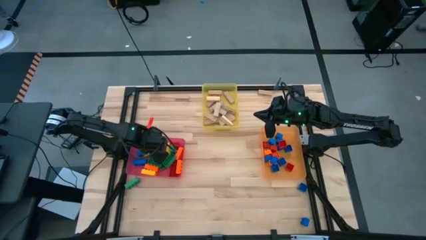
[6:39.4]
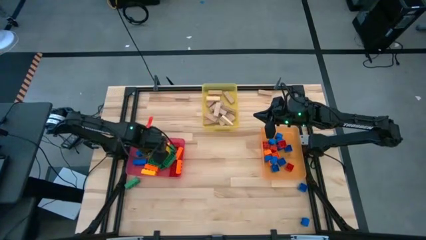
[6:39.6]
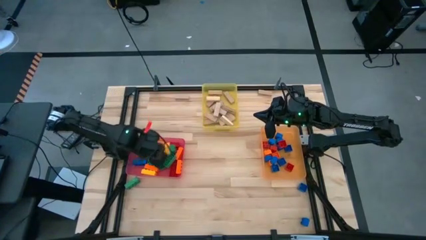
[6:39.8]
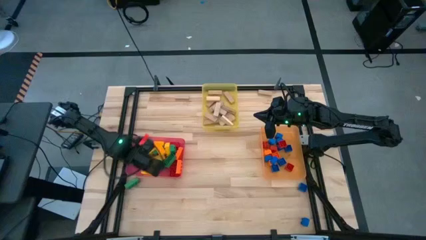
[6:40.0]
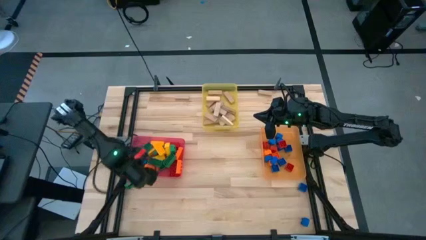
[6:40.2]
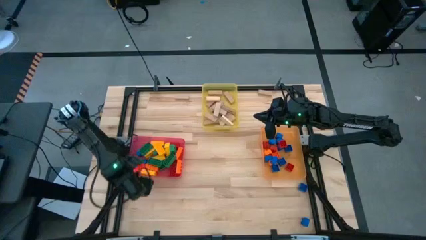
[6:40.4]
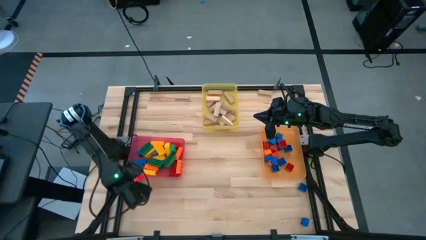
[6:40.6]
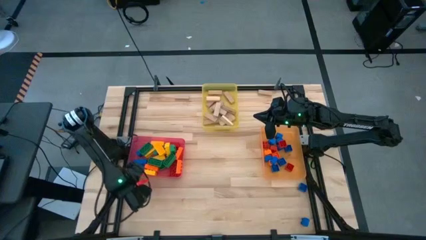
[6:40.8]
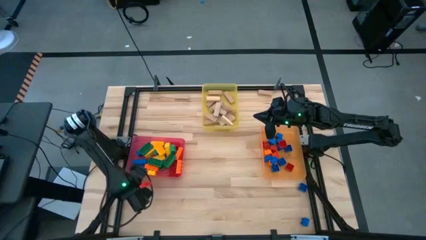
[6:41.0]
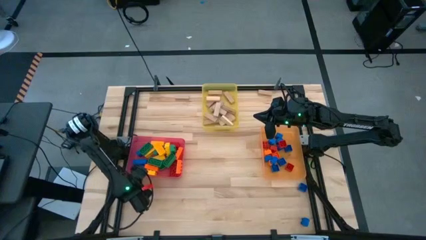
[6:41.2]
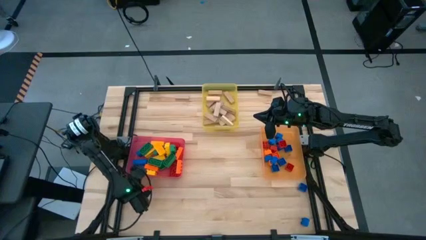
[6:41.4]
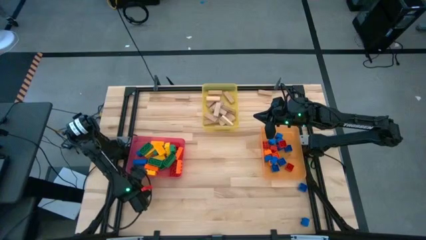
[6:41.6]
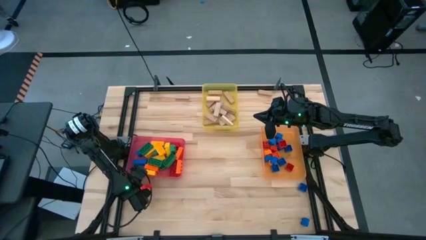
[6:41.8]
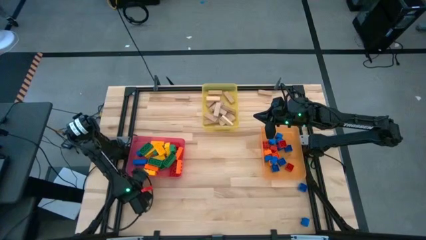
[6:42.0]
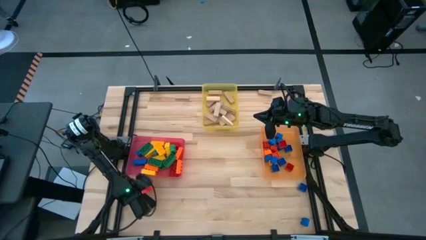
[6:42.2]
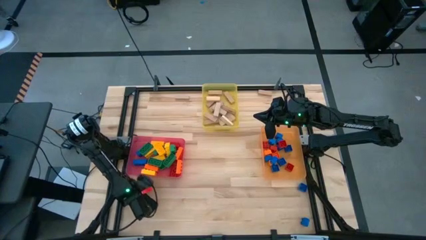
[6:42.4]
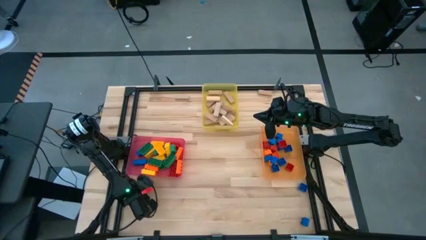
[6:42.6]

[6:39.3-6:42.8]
Task: Sort blocks by size
Put the 3 stud green game piece into the pink bin

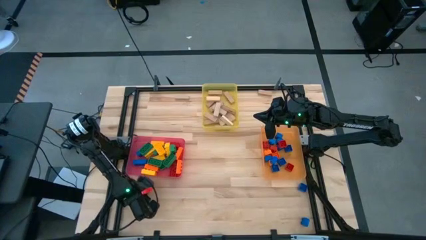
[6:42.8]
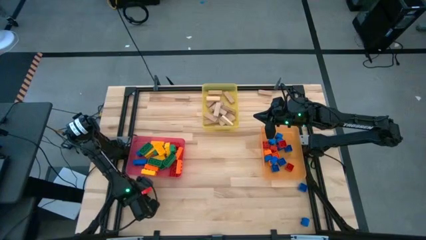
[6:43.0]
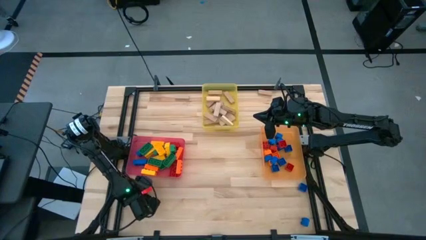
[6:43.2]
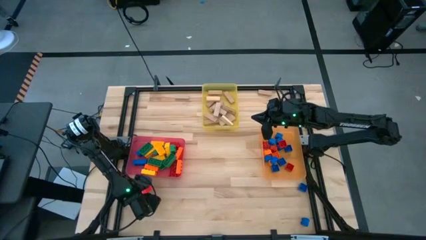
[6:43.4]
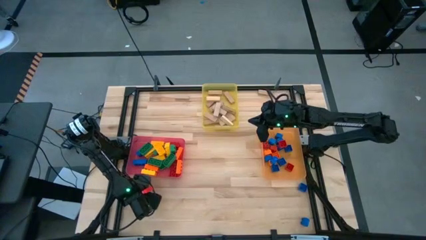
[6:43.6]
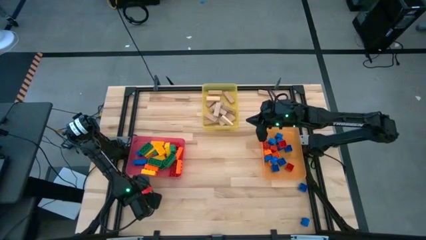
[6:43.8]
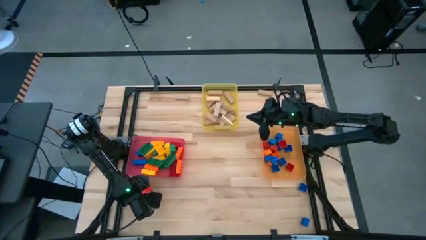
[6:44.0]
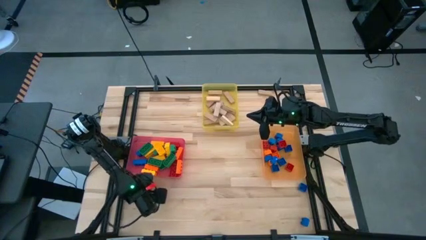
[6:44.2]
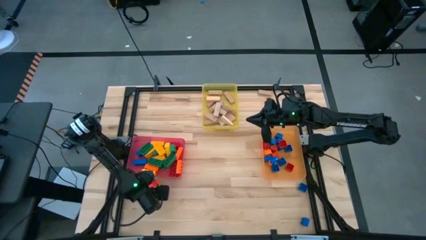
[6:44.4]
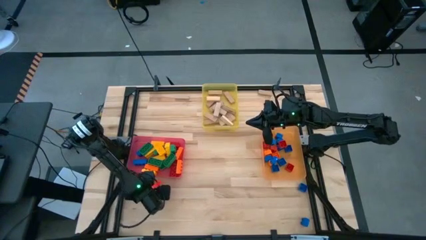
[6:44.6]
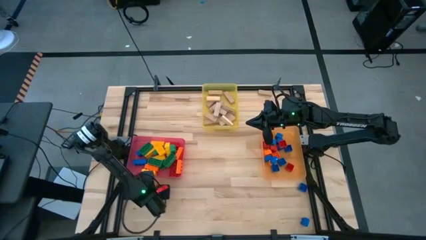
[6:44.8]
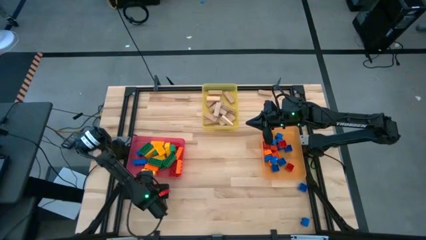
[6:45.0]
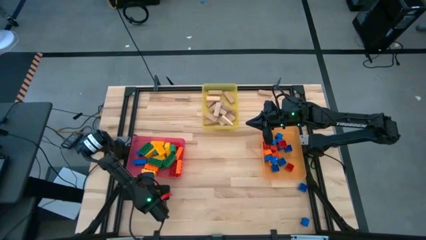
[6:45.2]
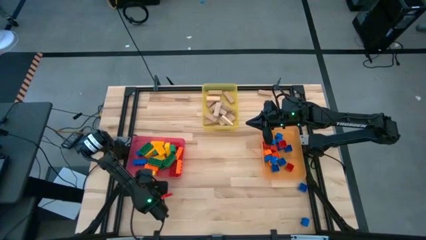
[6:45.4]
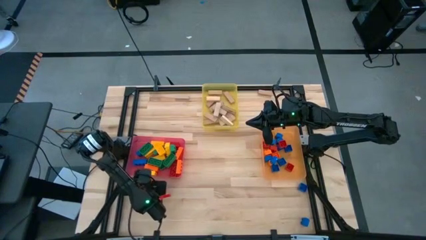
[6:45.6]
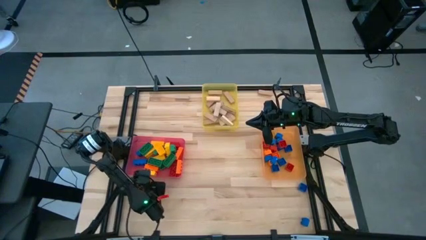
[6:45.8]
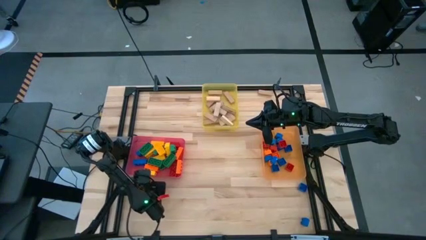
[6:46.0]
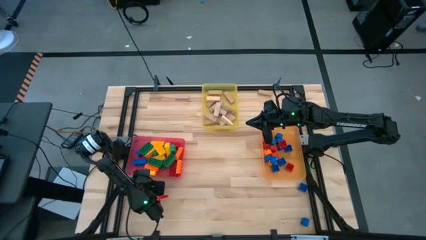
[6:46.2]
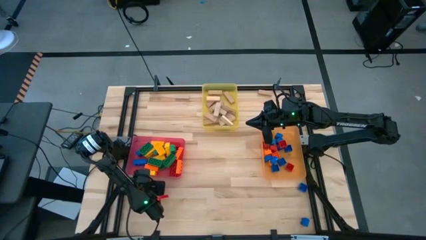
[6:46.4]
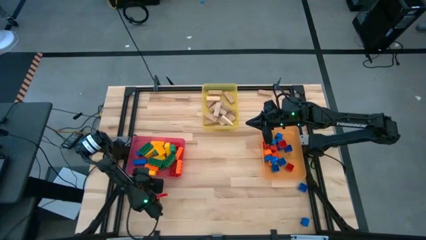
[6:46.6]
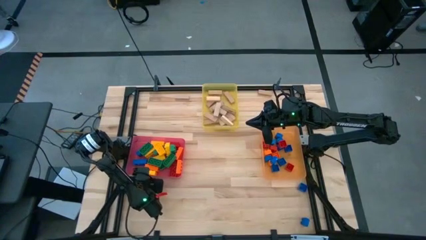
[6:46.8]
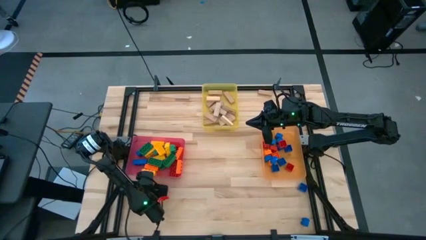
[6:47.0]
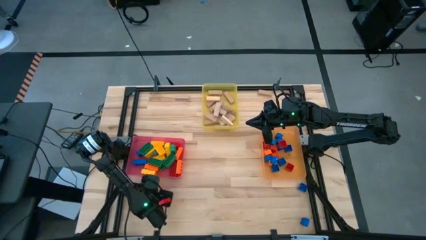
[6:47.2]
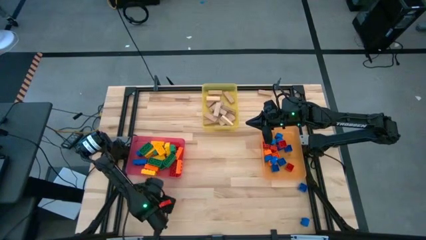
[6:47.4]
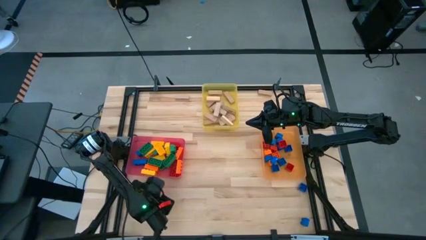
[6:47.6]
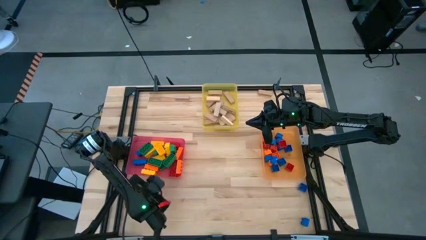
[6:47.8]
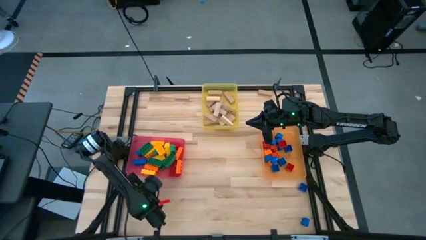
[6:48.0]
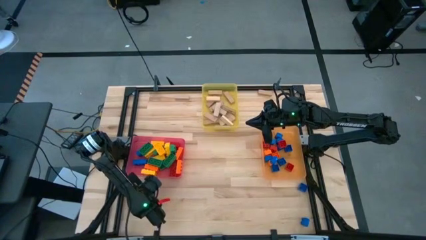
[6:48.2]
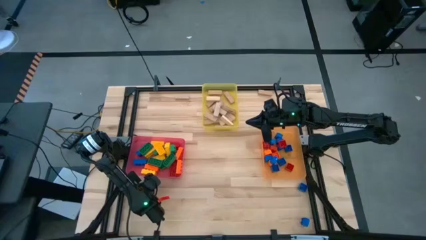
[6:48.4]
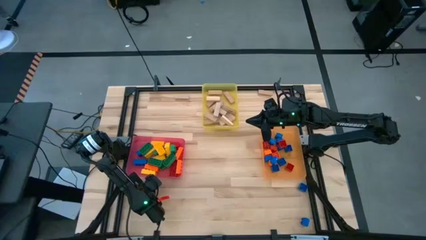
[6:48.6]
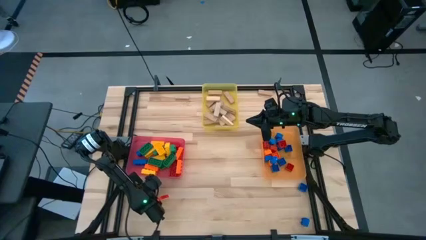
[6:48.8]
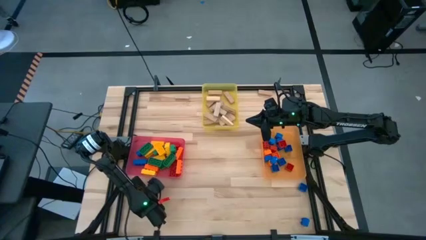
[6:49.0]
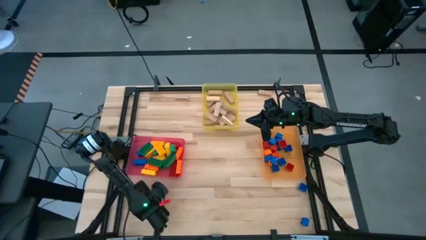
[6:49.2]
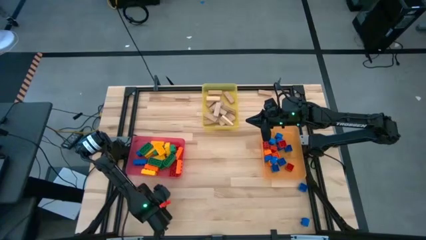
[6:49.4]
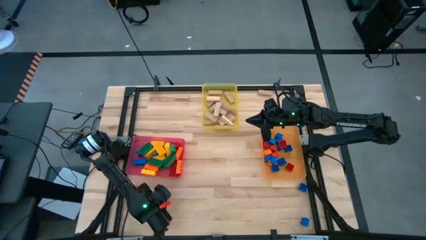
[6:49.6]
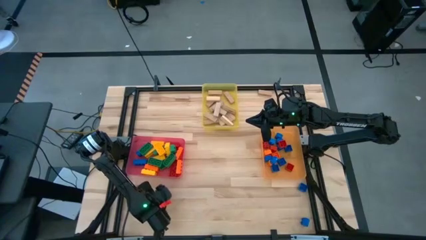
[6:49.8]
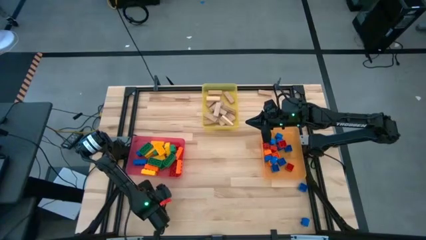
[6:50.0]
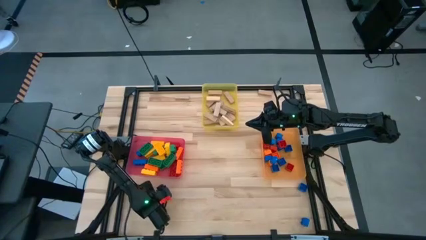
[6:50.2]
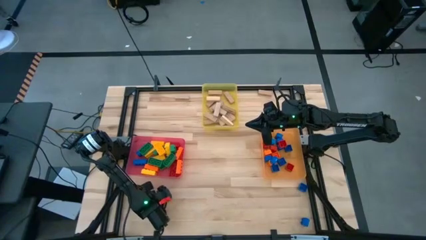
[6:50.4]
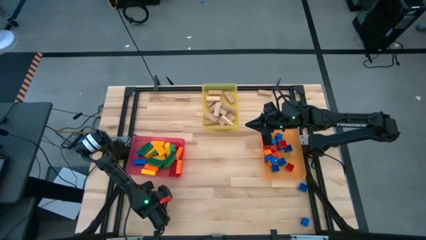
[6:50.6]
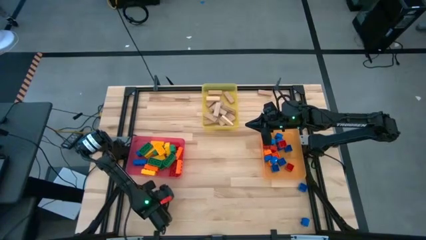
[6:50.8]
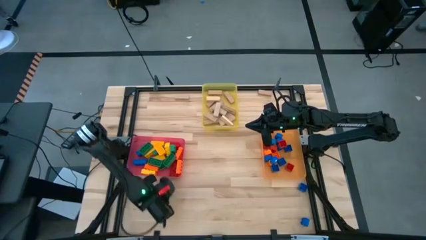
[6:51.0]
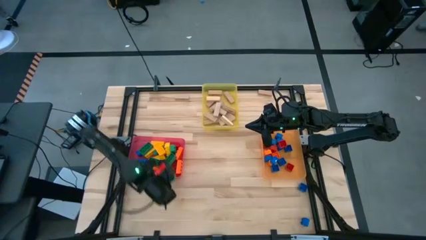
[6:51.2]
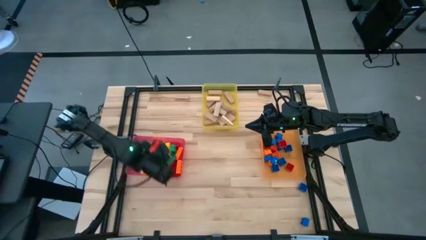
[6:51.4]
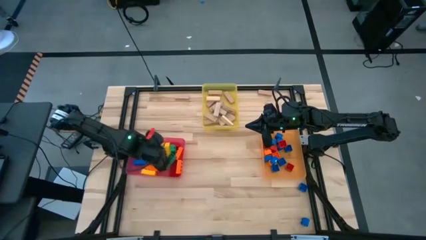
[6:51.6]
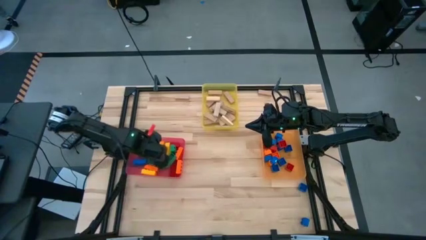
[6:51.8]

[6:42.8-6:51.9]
Put the 3 stud green game piece into the pink bin

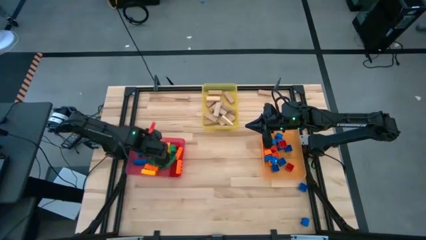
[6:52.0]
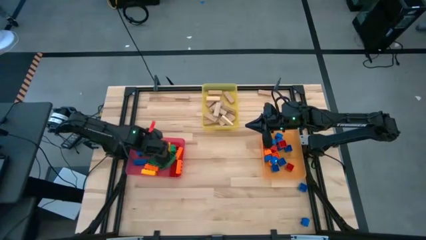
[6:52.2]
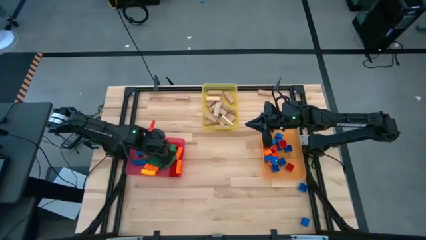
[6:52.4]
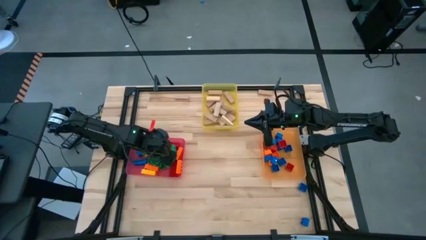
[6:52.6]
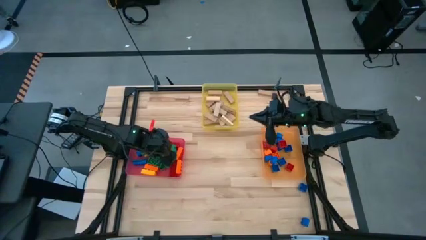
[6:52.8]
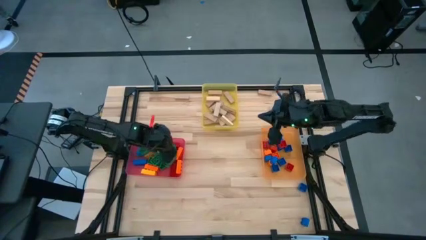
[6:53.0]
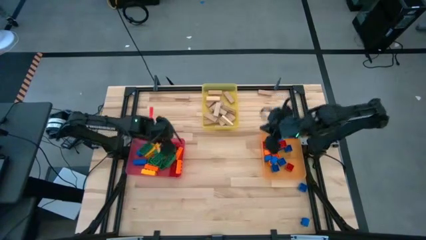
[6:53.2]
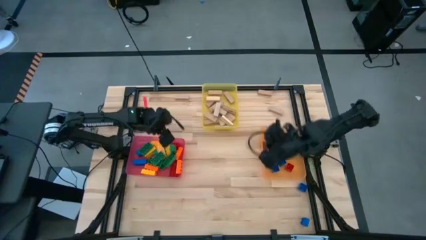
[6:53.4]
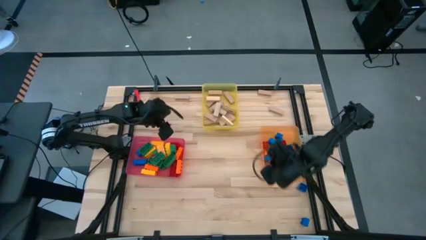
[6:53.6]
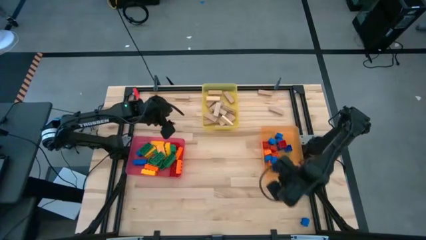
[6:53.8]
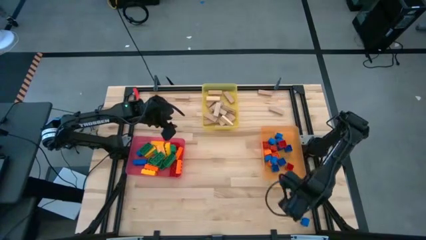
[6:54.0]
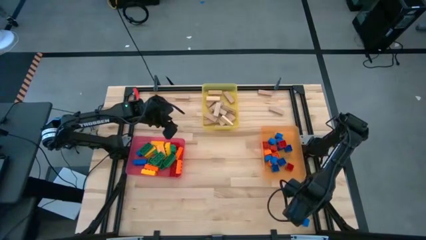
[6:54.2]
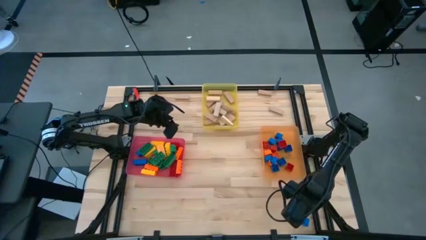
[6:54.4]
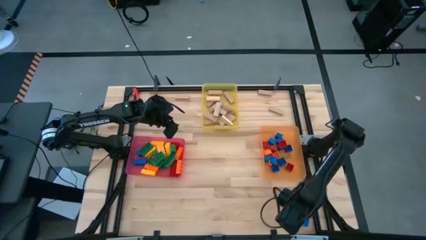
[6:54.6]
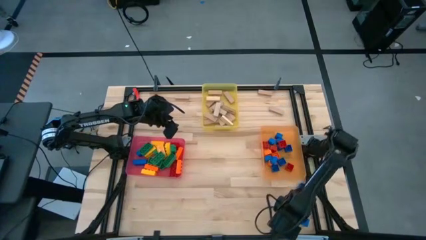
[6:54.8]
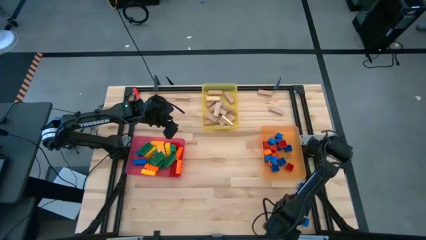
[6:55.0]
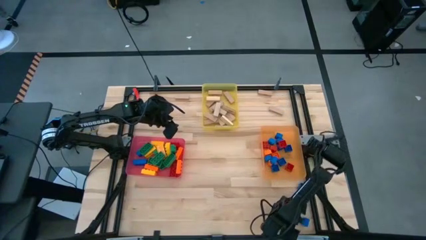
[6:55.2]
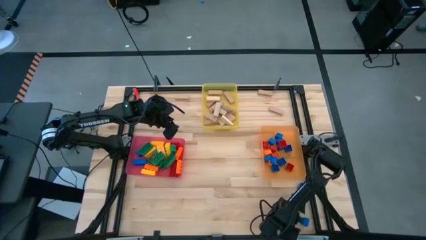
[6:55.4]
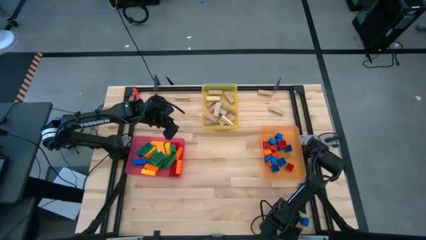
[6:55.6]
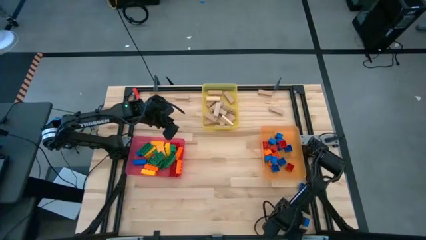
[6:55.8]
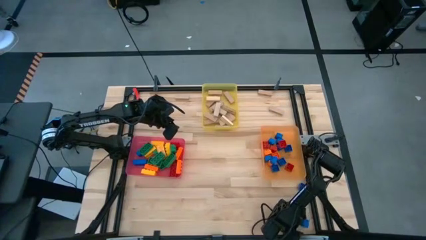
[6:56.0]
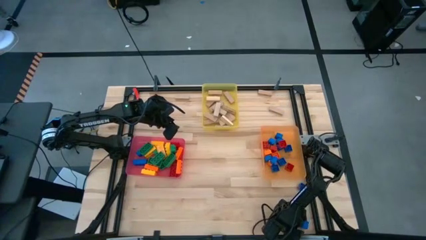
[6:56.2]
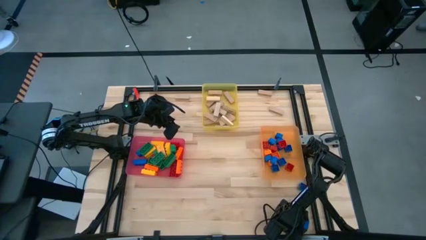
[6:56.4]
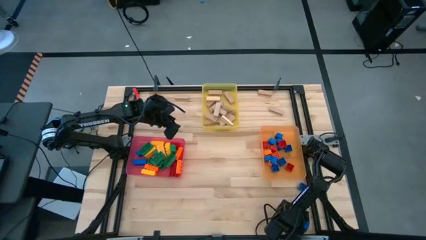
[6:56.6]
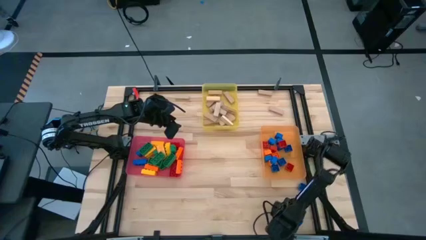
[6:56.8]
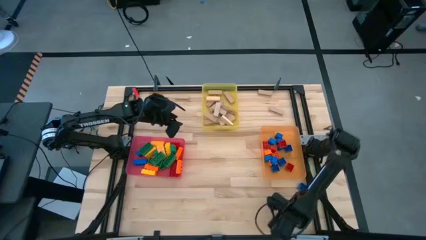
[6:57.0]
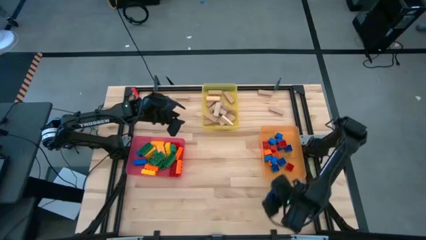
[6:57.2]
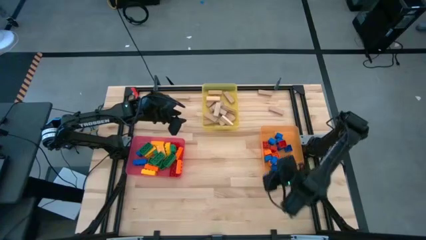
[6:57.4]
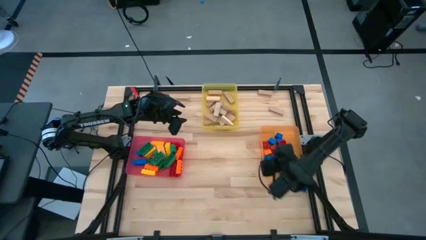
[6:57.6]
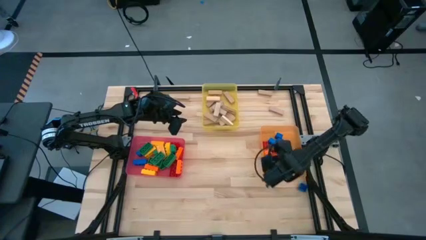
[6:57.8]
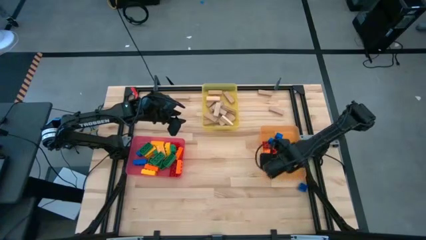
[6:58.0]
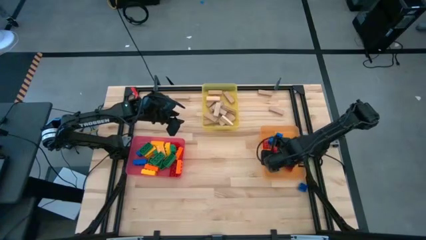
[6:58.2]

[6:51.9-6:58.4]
Put the 1 stud blue game piece into the orange bin
